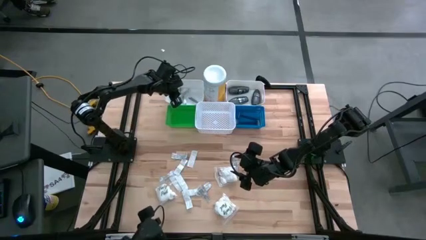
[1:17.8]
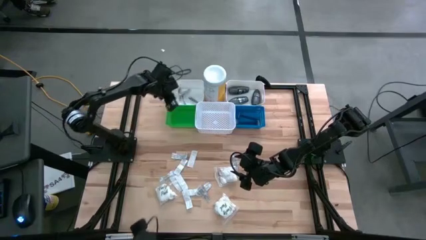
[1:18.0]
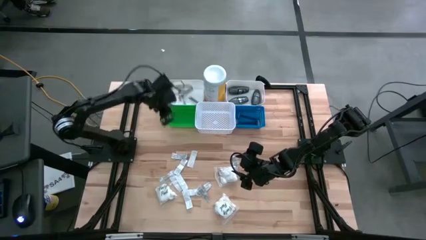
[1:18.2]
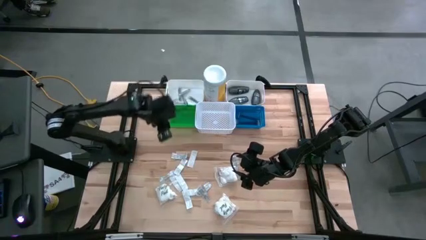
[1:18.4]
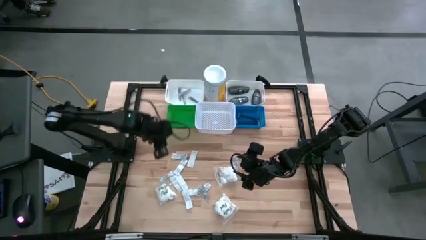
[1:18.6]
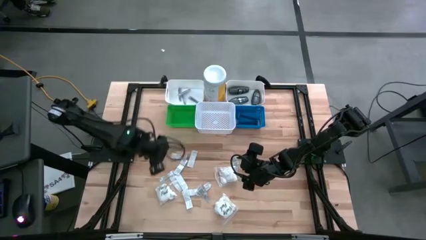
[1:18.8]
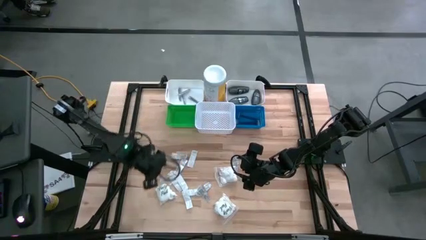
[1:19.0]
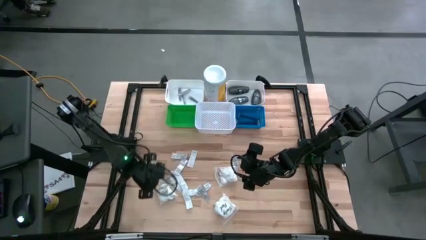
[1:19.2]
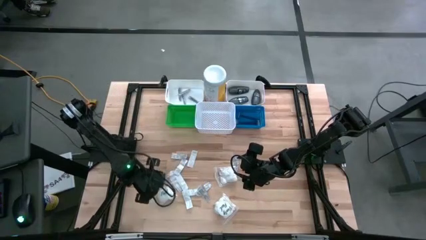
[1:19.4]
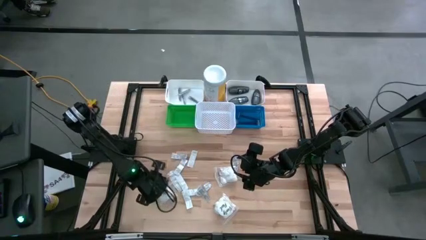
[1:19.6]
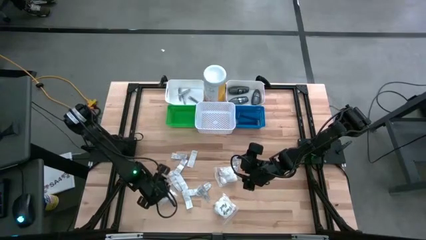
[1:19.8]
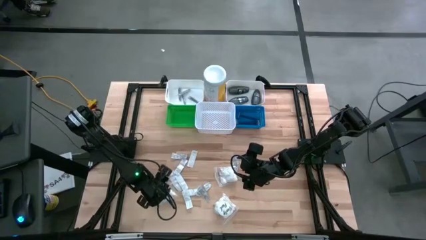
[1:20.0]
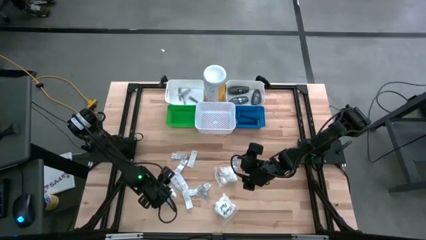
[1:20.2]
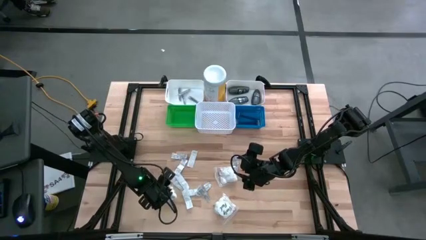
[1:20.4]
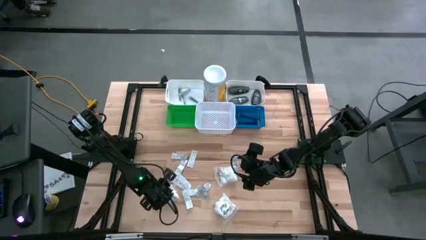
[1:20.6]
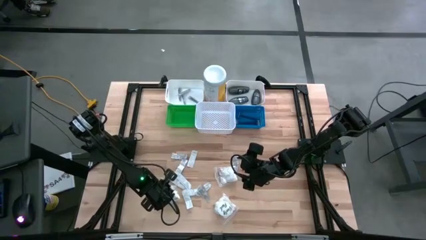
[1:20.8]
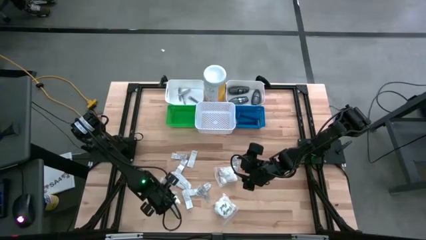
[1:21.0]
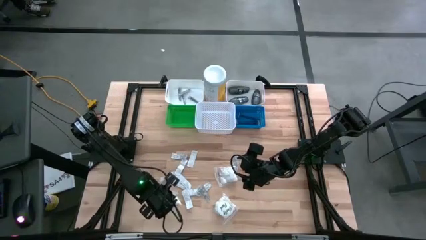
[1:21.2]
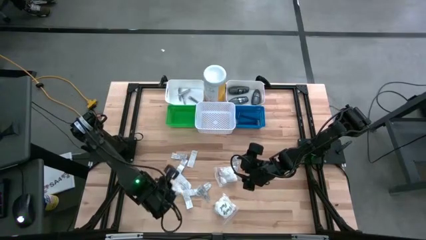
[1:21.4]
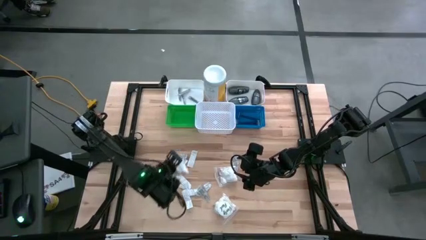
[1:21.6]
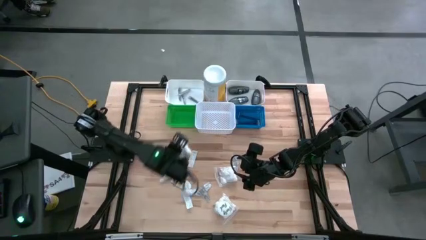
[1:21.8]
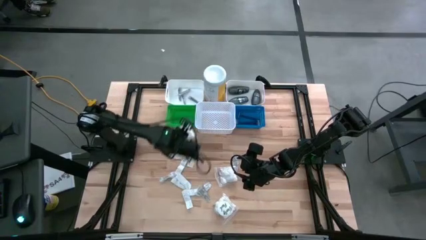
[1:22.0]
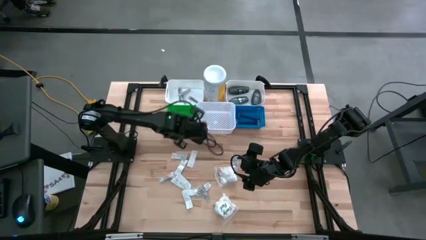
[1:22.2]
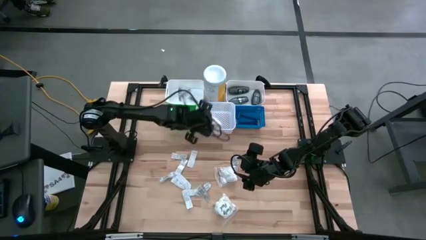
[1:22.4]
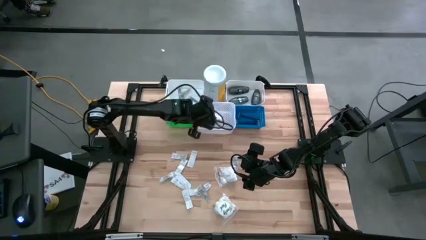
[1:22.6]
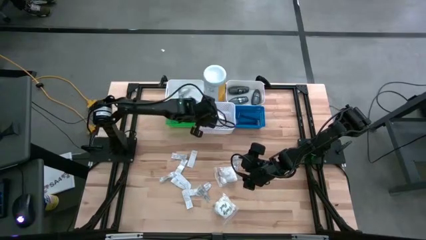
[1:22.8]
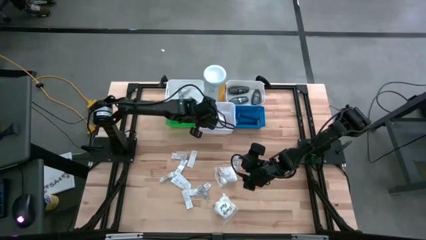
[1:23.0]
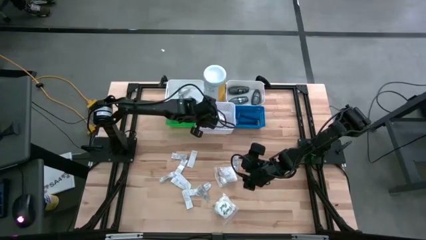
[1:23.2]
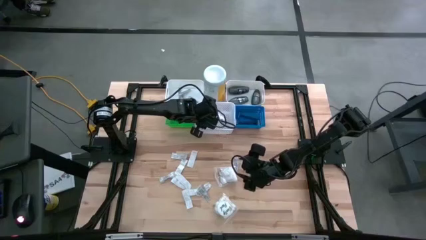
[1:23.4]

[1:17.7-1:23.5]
Task: Pick & Place Travel size toiletries
Put the white cotton pack into the bottom white bin

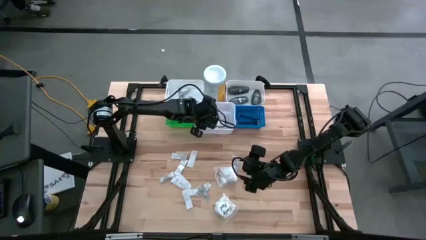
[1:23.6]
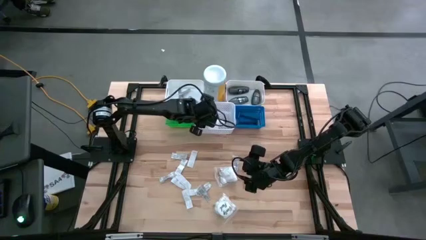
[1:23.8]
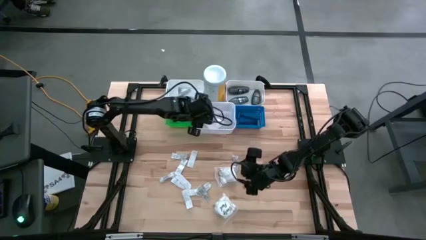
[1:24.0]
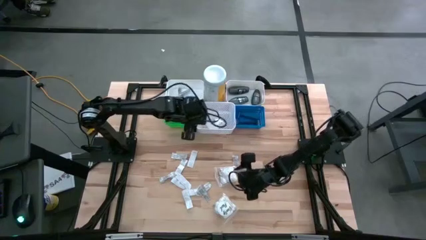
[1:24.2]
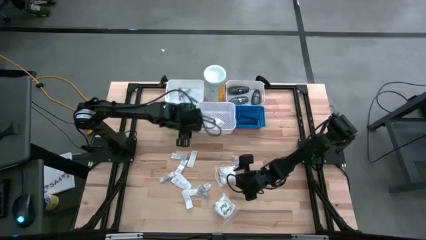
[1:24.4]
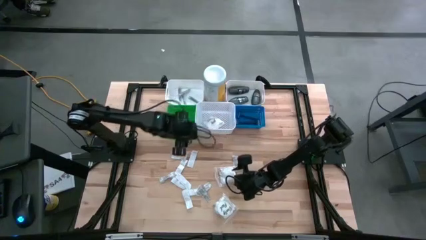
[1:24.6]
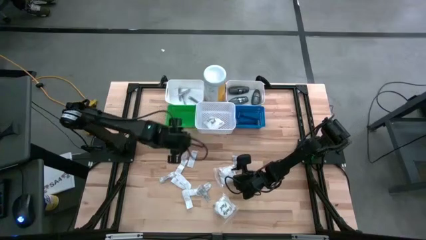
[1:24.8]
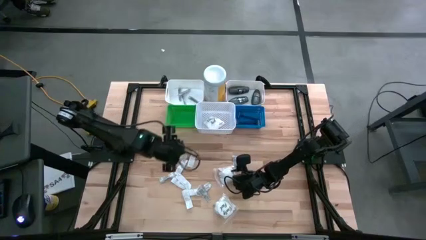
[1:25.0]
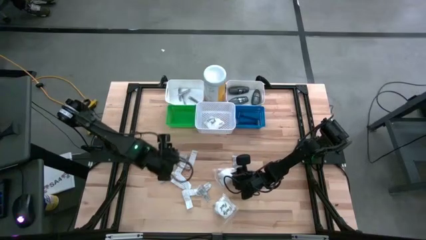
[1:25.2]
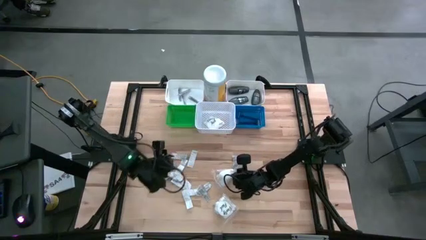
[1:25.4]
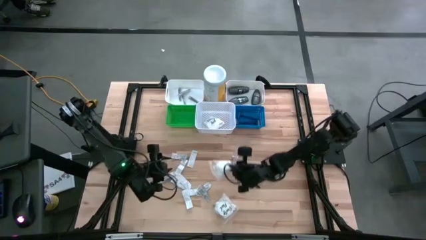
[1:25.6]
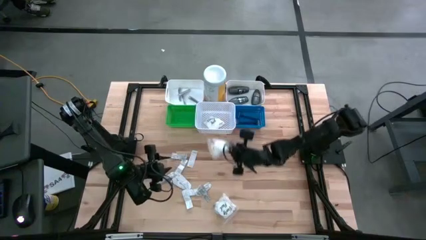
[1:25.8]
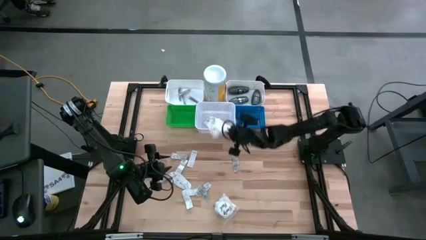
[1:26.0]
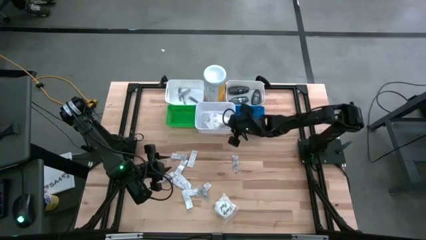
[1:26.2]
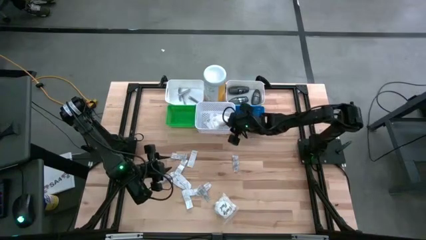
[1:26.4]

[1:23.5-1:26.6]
Put the white cotton pack into the bottom white bin

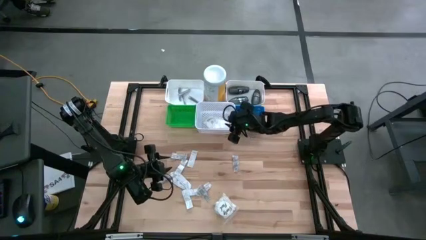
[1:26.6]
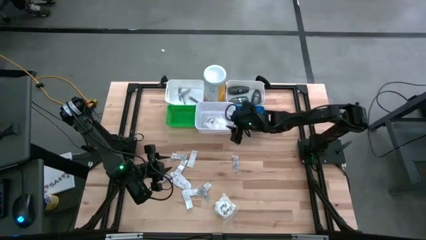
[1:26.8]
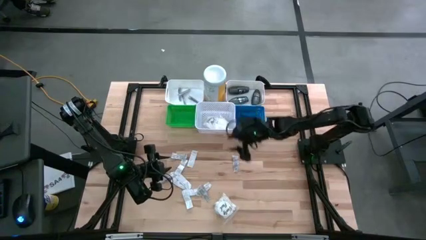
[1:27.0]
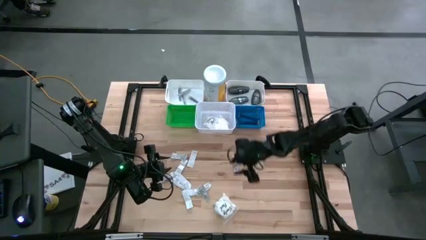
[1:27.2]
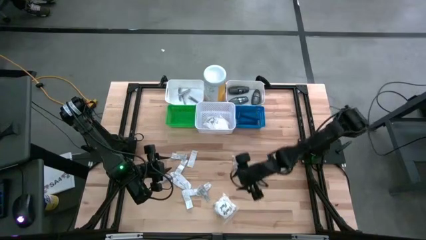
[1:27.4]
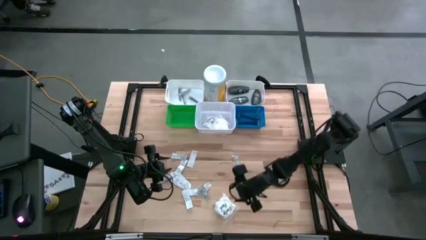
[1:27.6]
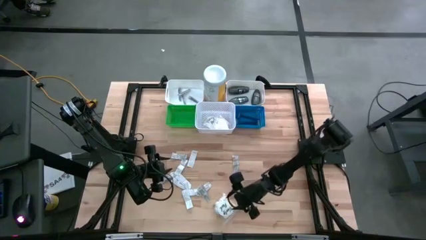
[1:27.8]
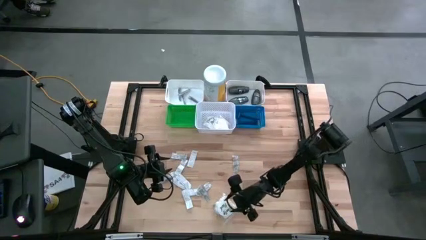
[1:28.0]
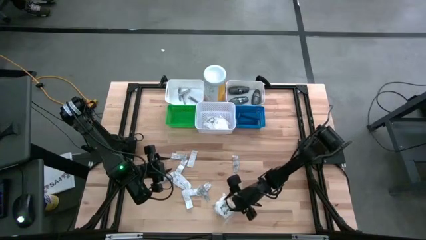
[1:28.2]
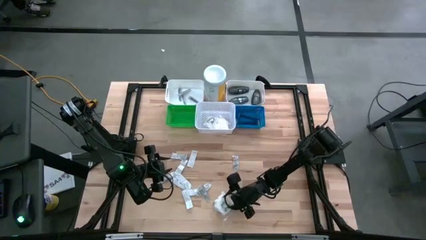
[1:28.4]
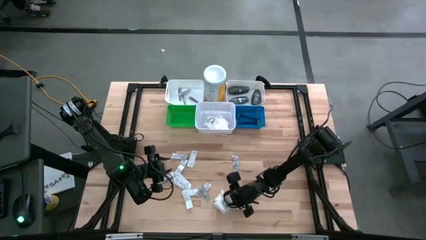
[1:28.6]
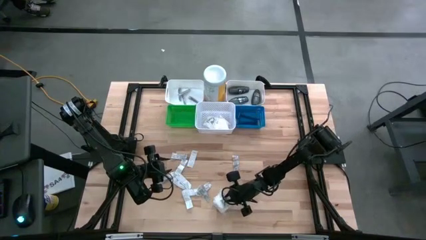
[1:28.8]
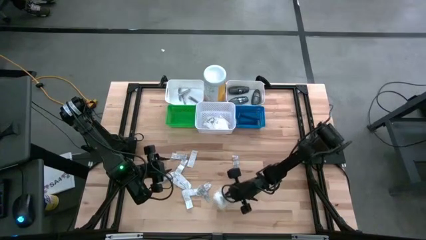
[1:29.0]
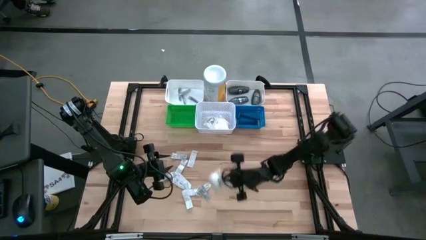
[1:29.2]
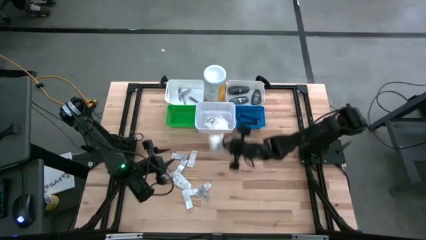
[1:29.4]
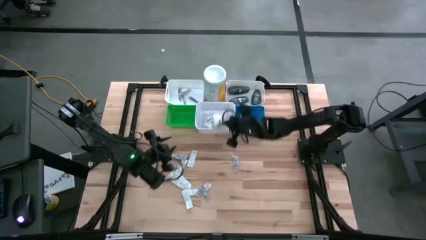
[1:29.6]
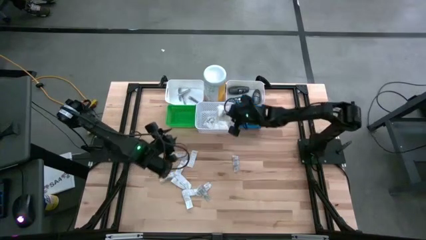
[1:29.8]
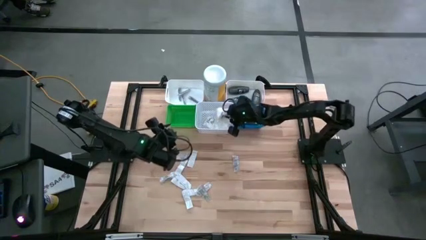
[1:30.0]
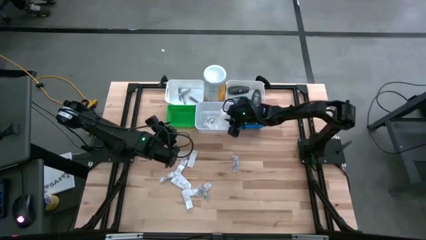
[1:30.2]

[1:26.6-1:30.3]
Put the white cotton pack into the bottom white bin

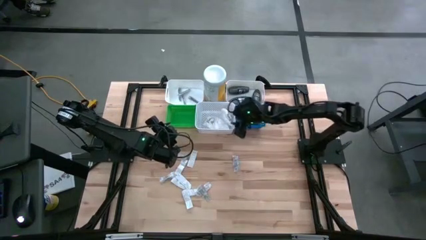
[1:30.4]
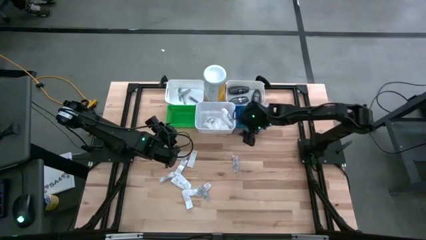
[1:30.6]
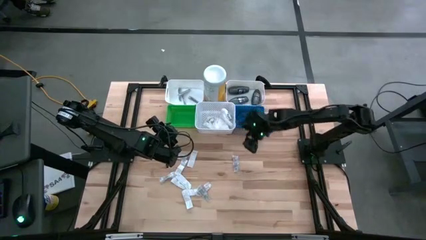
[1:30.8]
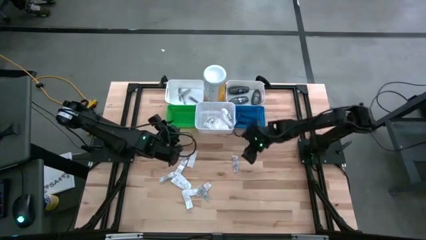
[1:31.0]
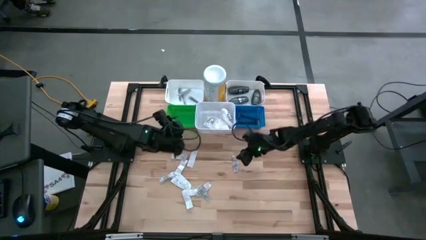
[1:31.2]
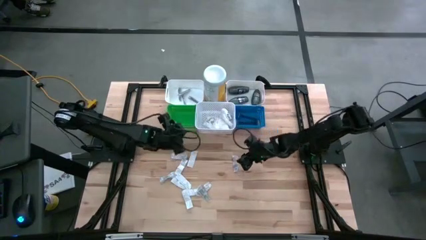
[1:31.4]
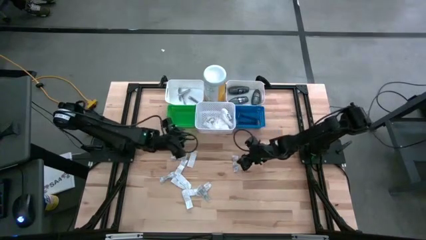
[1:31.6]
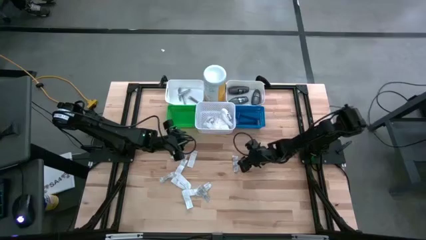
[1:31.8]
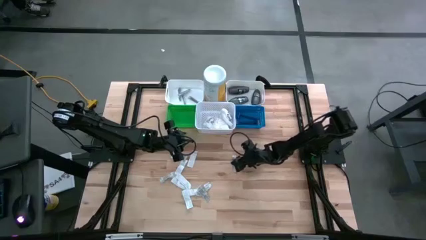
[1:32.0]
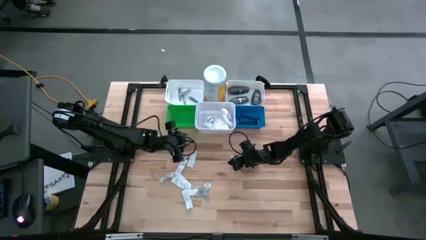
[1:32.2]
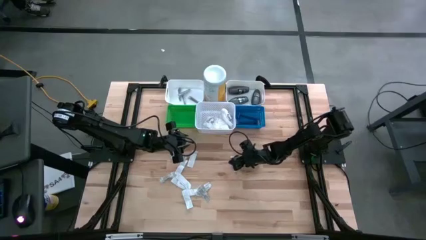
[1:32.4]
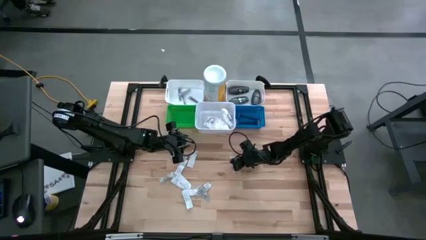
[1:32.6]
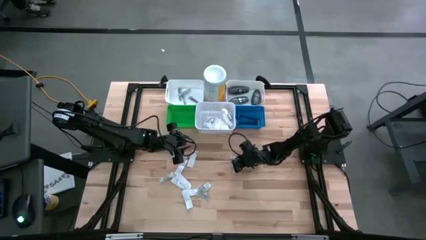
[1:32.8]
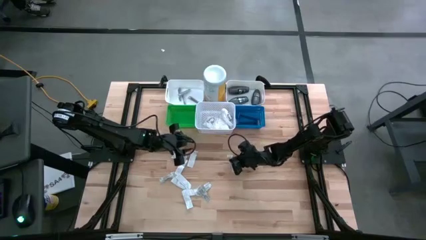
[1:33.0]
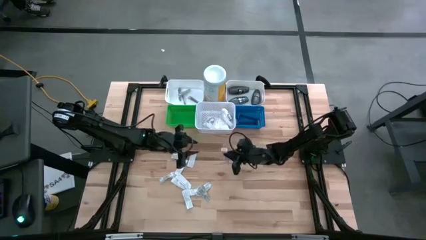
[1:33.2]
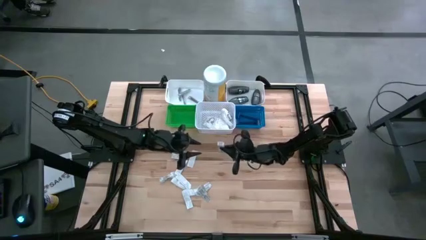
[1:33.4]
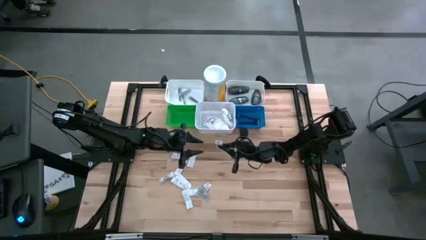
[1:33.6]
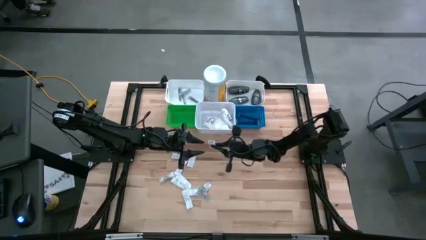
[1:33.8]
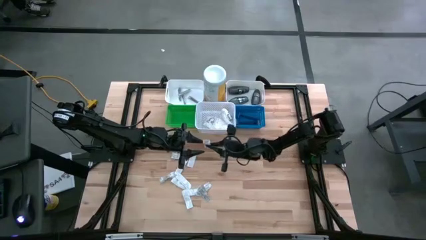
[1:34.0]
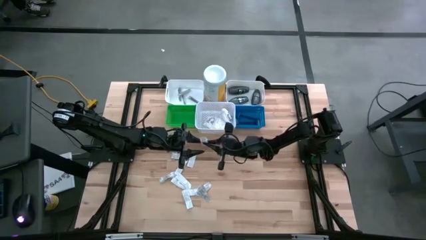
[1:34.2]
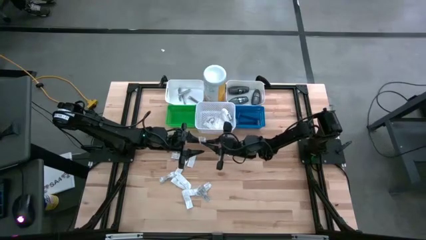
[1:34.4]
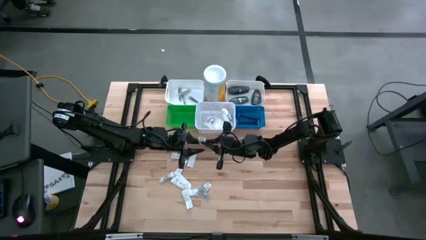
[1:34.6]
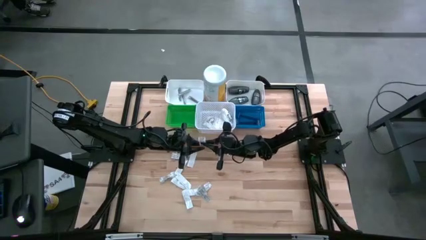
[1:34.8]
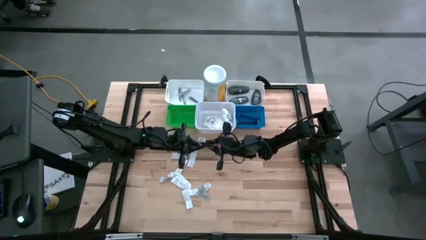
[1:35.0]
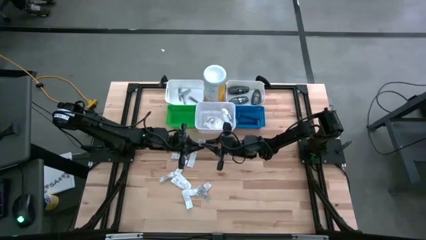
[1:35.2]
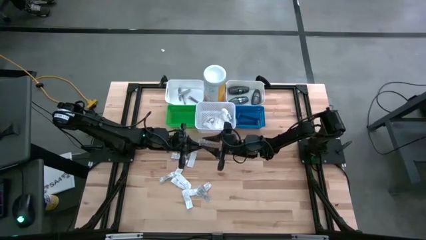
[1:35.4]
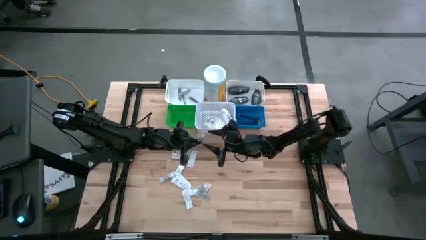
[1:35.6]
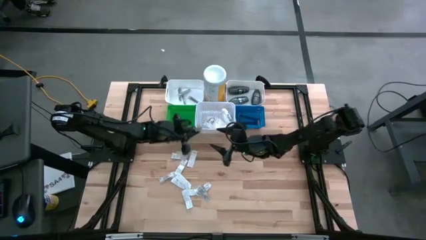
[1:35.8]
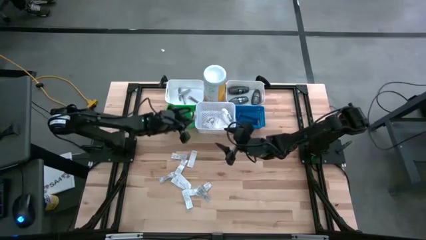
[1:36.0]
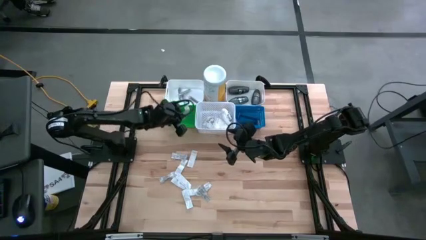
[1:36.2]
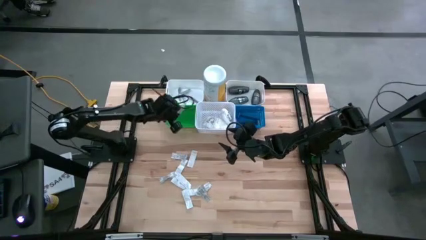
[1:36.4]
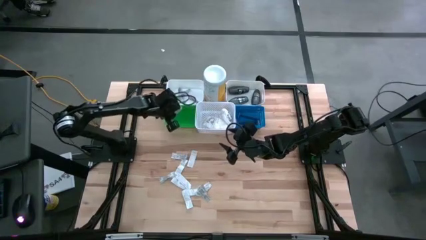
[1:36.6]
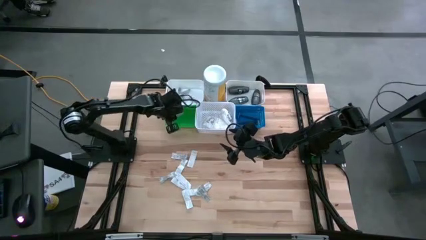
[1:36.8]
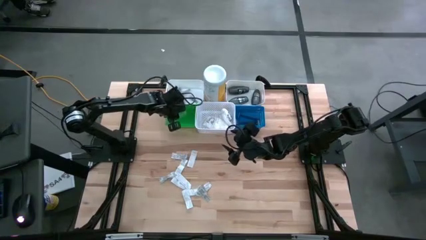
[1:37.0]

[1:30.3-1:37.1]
Put the white bandage into the green bin
